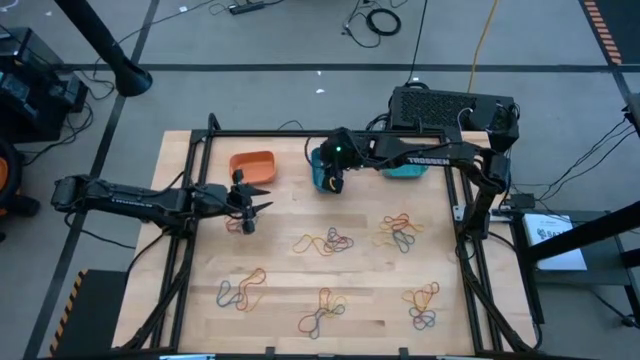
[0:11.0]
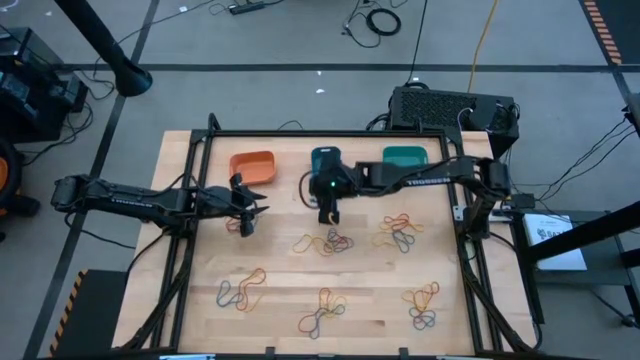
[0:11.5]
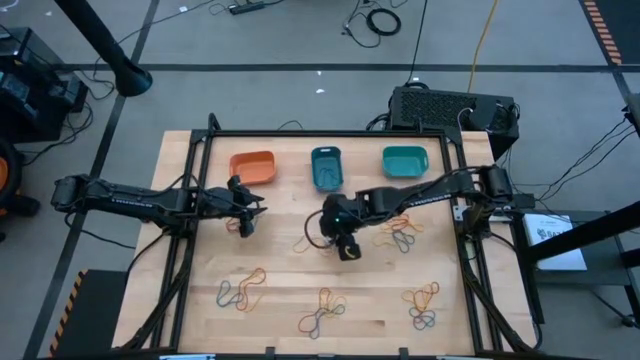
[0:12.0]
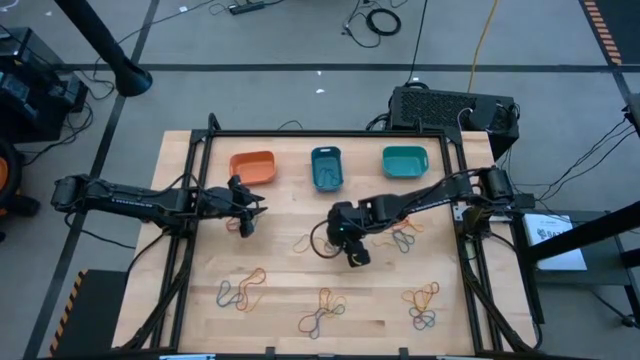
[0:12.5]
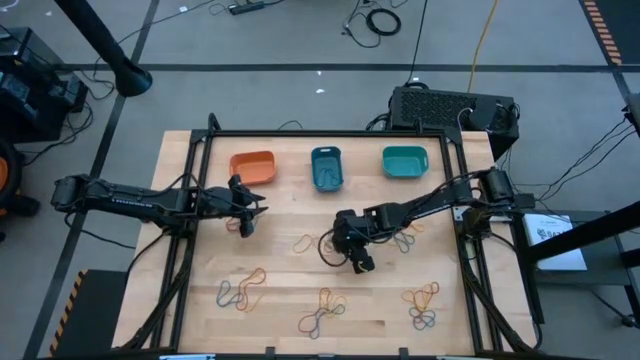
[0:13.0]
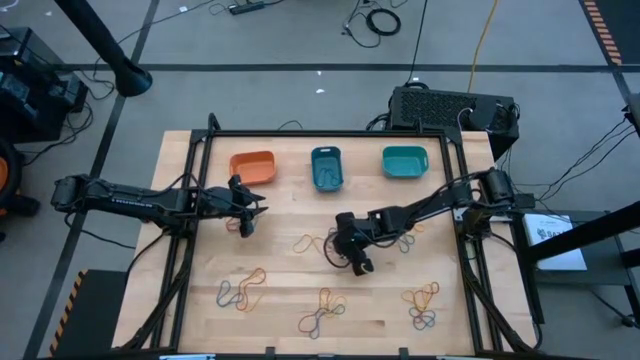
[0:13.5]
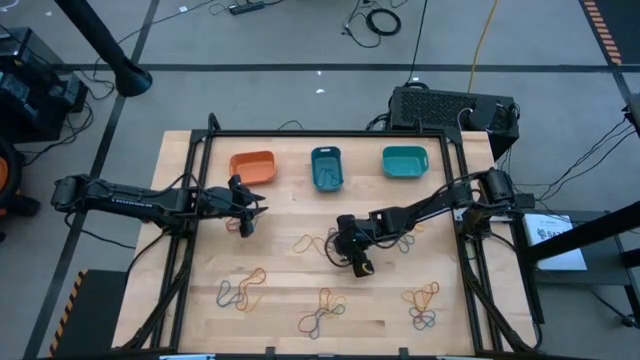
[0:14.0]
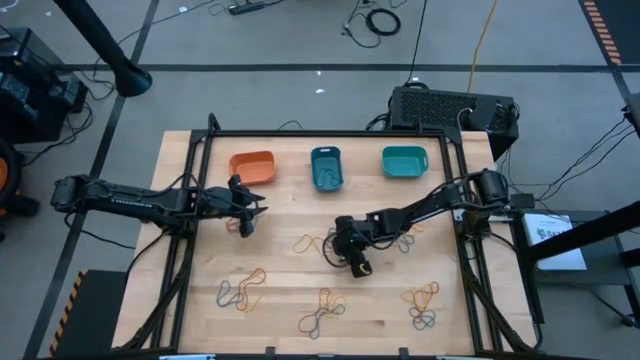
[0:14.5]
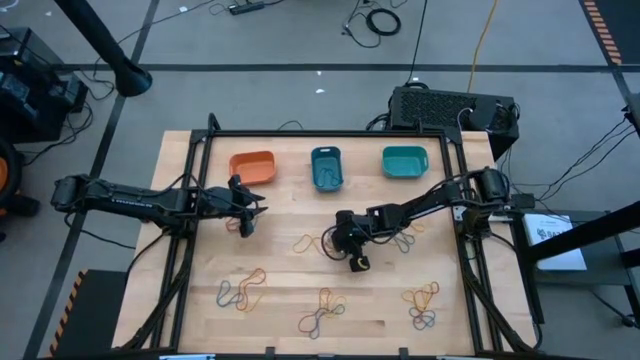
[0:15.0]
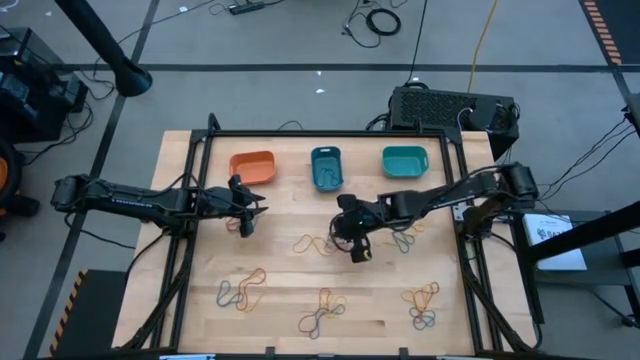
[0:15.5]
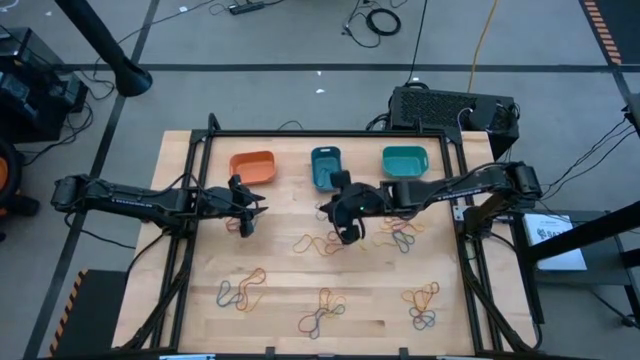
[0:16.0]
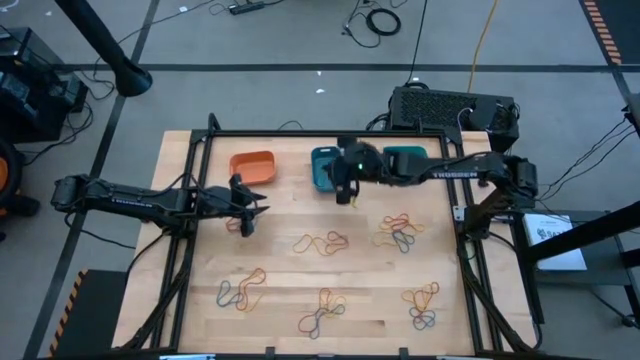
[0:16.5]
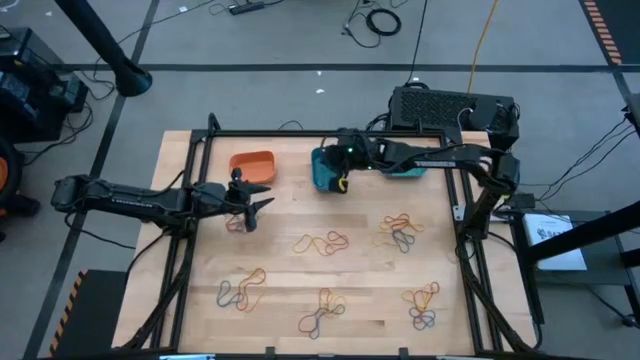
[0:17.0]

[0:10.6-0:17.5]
Task: Sort rubber bands into baskets
Put the blue rubber band into the blue bin

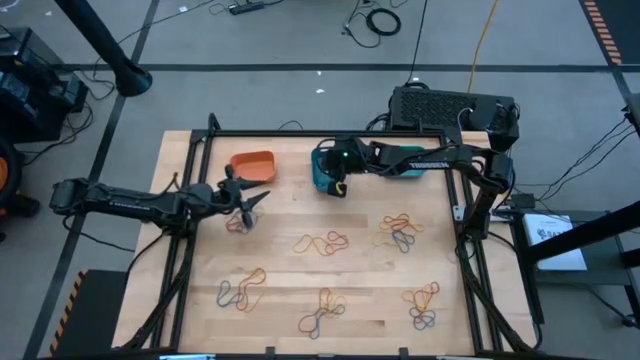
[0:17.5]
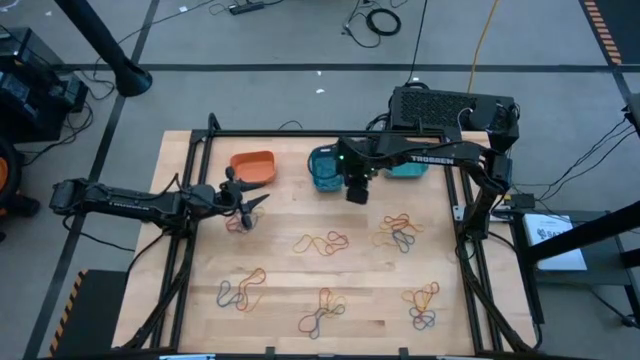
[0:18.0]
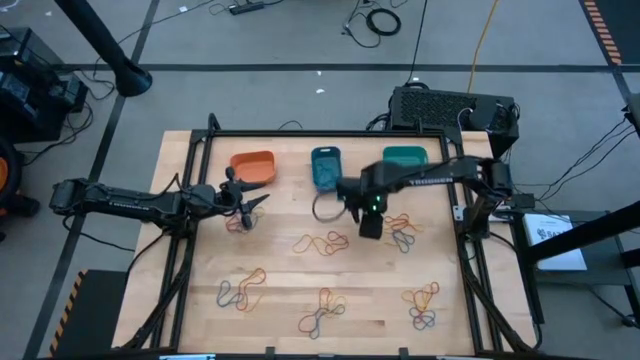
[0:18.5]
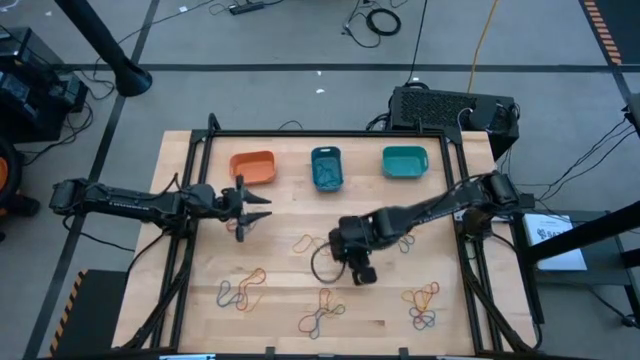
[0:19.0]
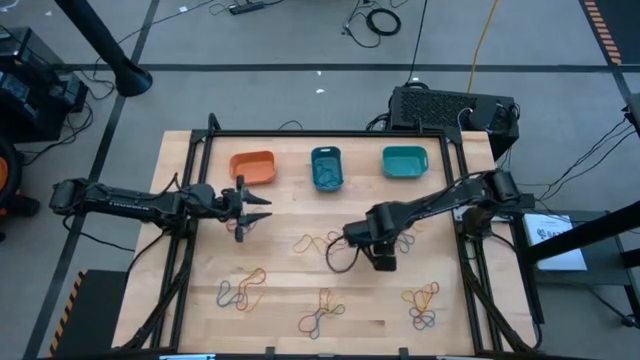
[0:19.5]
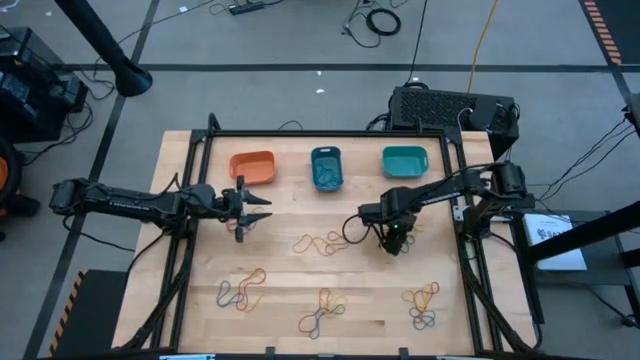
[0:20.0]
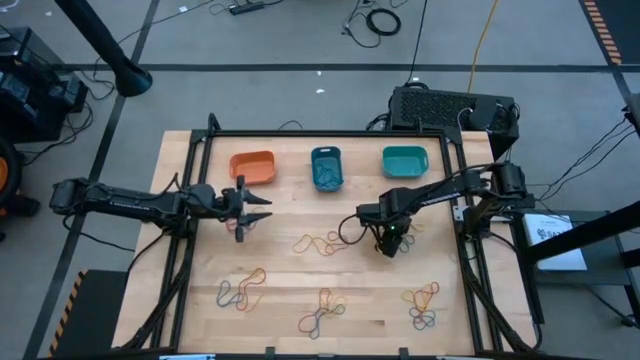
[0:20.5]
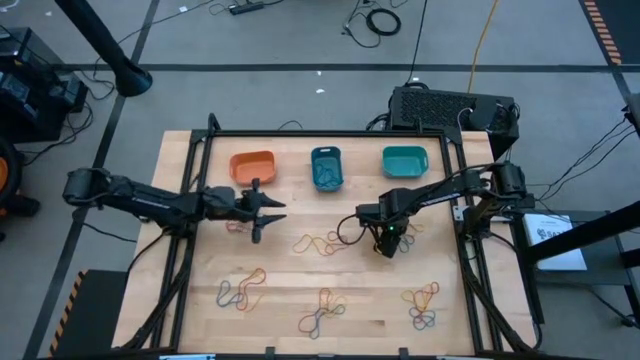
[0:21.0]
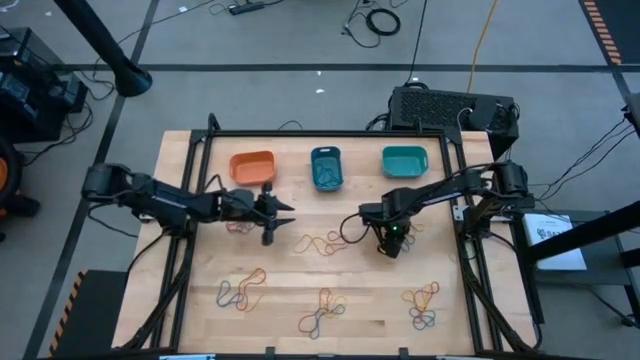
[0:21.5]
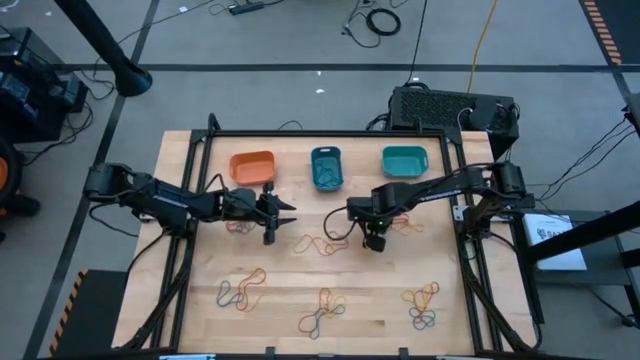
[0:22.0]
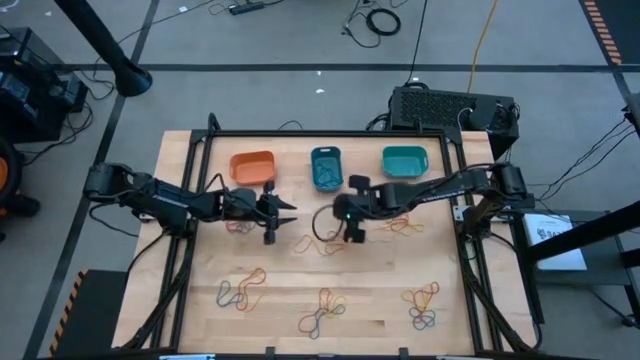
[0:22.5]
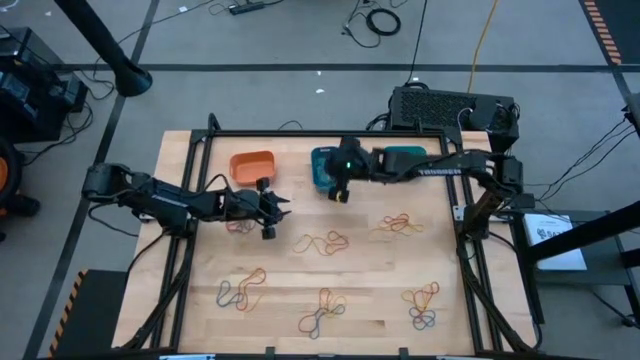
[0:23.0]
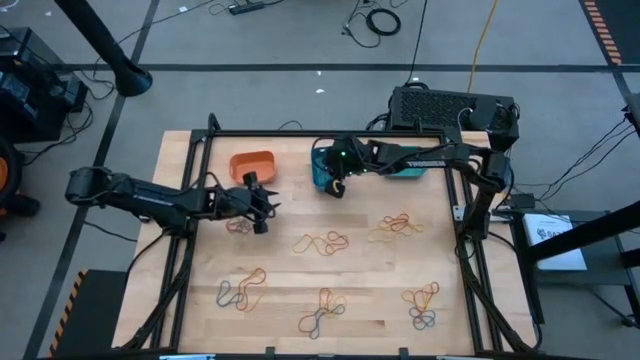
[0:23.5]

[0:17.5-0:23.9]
Put the blue rubber band into the blue bin

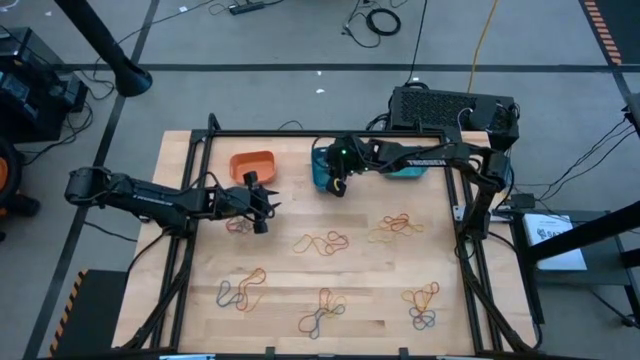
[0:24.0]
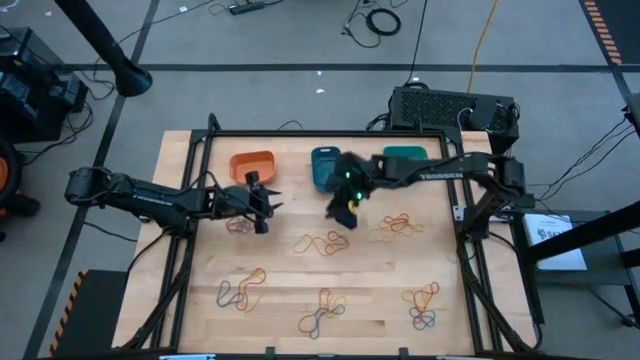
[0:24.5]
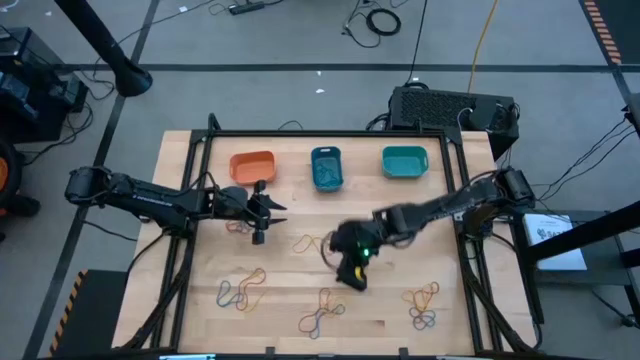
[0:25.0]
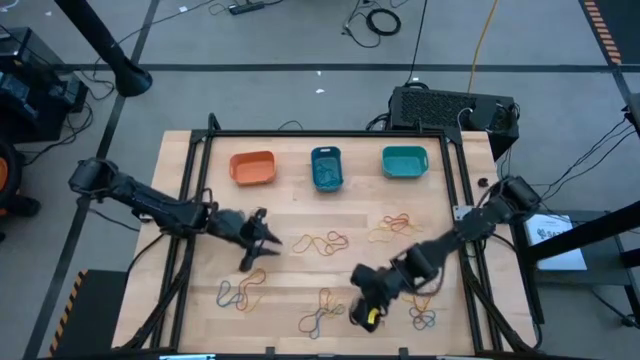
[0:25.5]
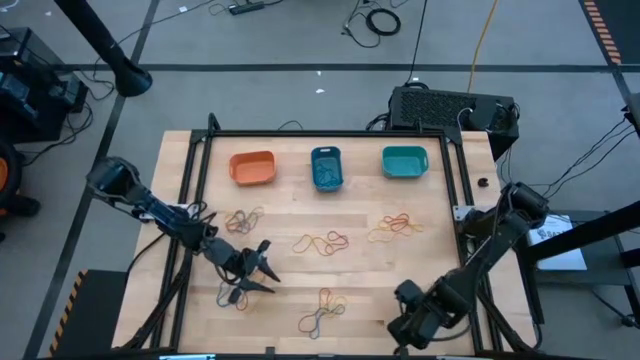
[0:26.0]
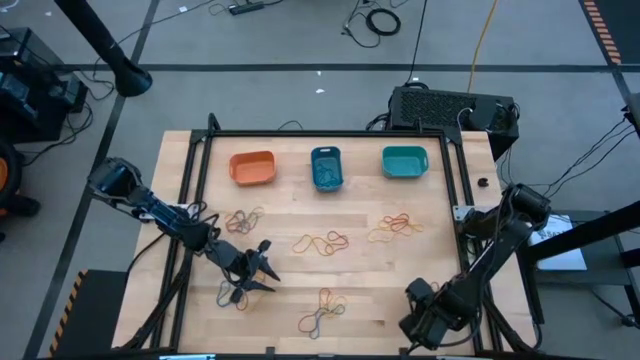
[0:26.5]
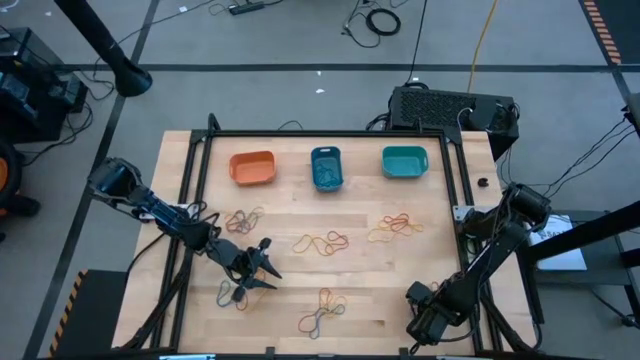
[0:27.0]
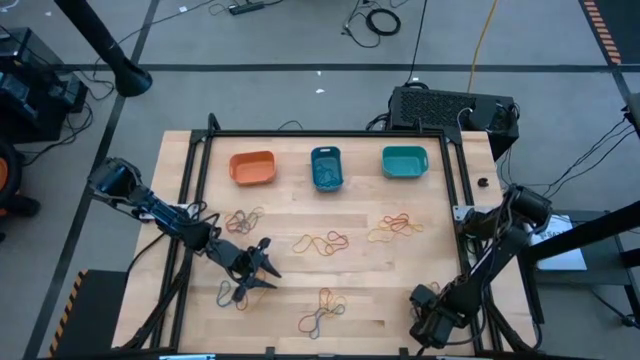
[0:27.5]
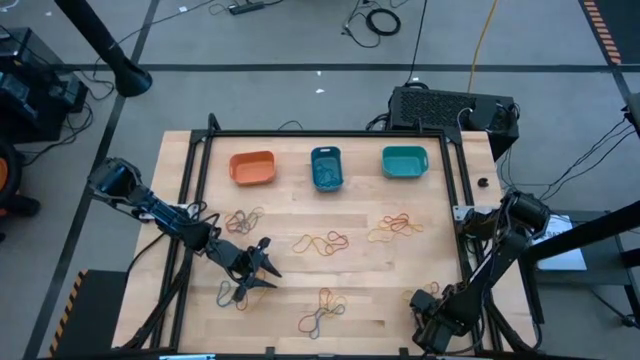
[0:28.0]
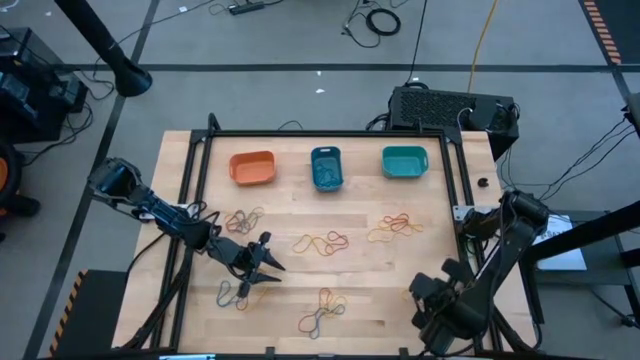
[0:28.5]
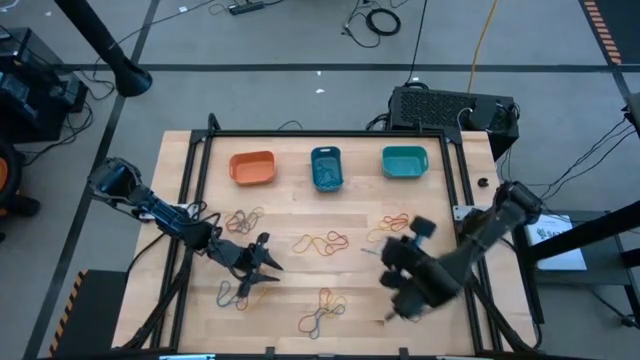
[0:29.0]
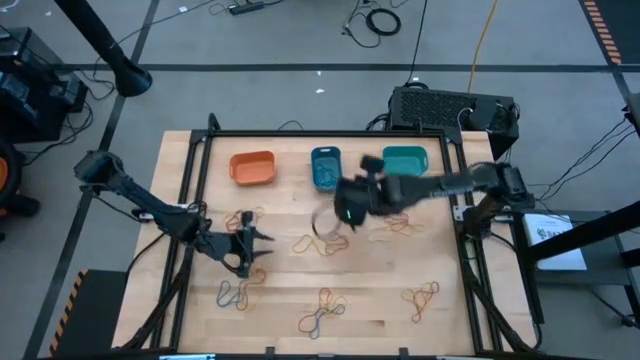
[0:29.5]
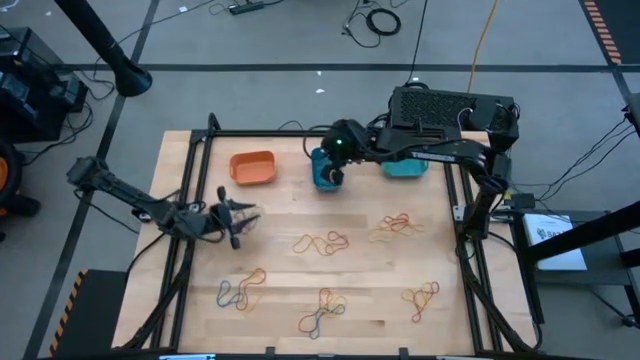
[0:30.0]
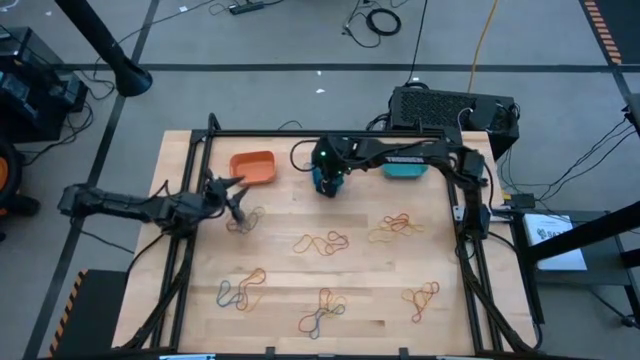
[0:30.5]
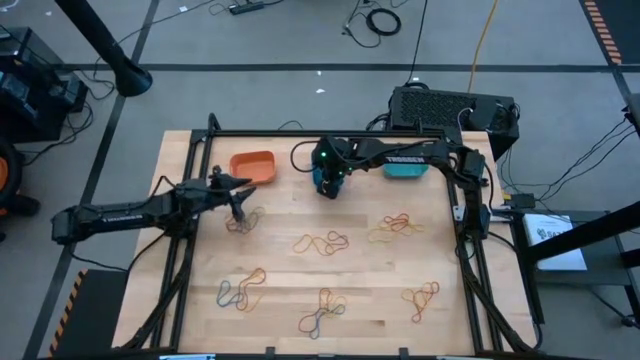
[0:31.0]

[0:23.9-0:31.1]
Put the blue rubber band into the blue bin
